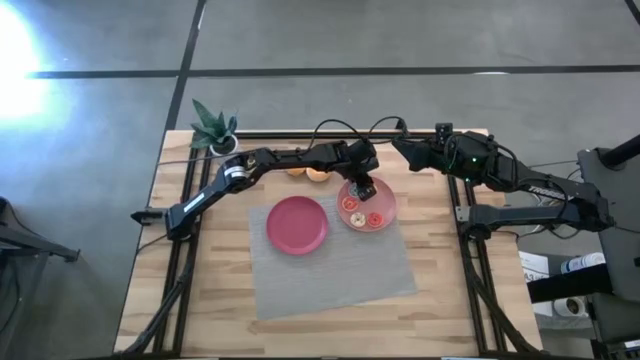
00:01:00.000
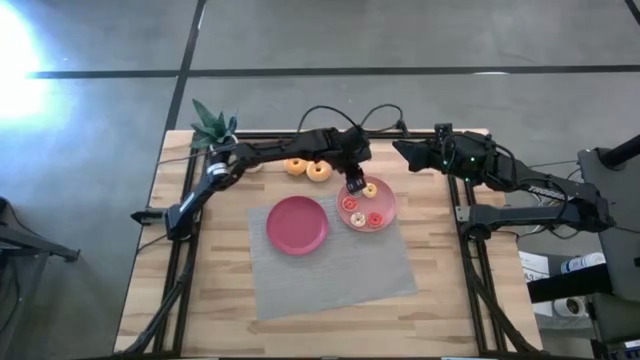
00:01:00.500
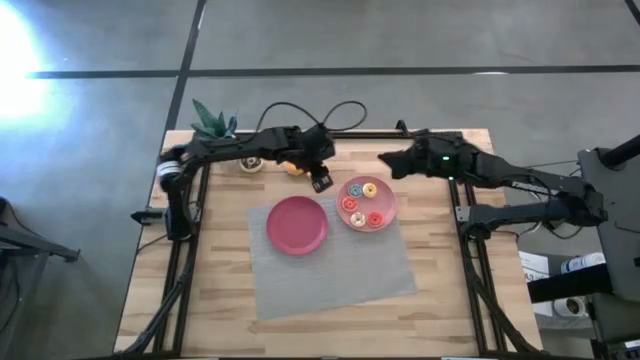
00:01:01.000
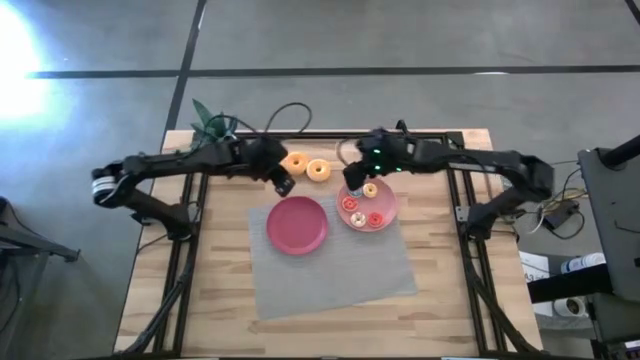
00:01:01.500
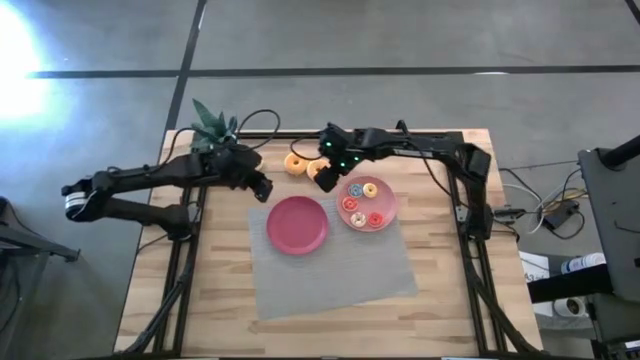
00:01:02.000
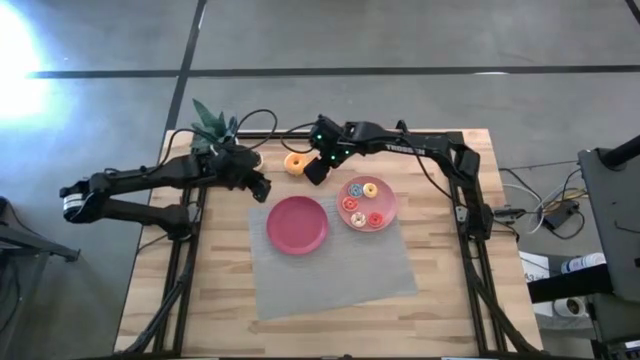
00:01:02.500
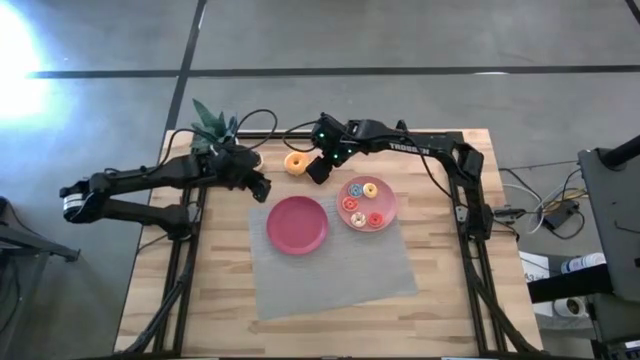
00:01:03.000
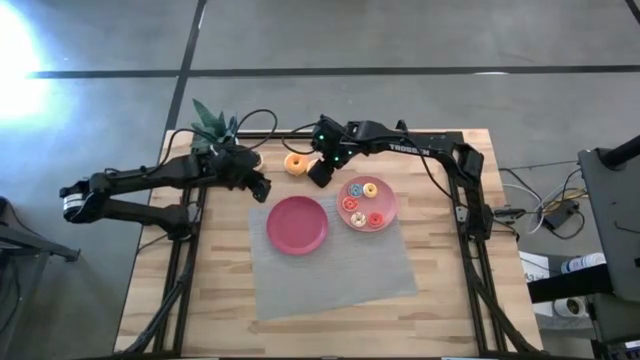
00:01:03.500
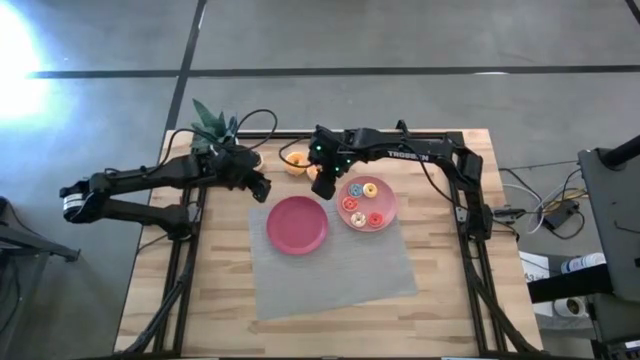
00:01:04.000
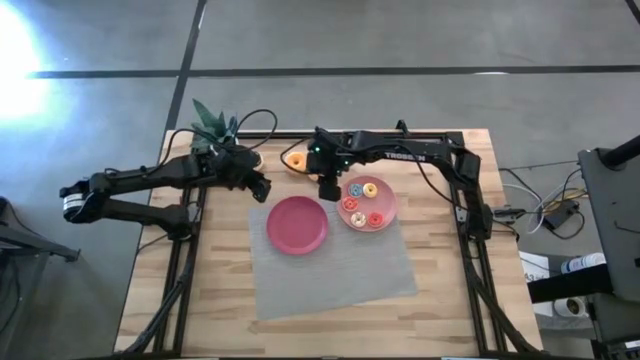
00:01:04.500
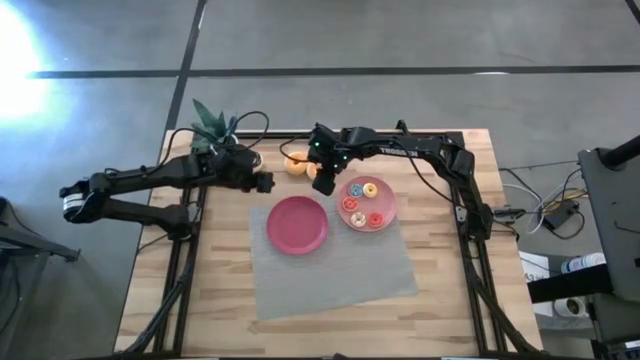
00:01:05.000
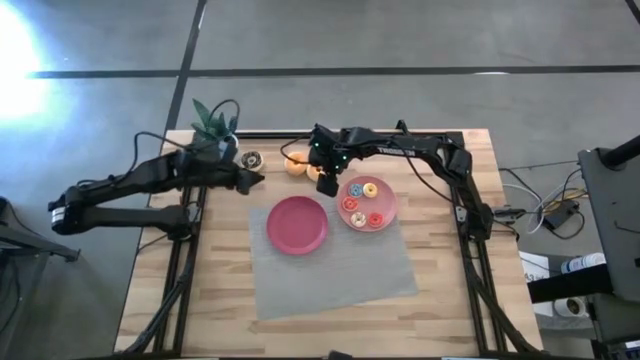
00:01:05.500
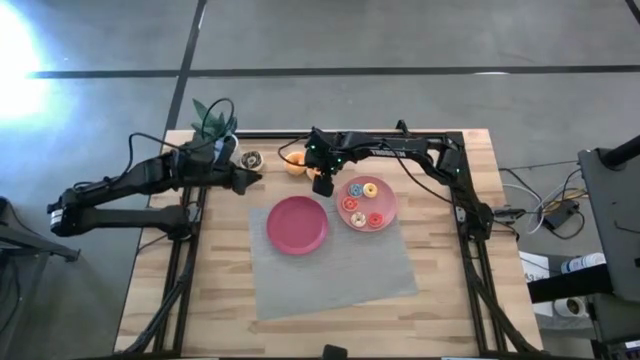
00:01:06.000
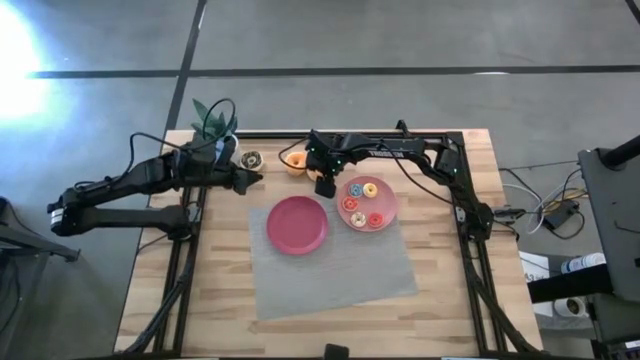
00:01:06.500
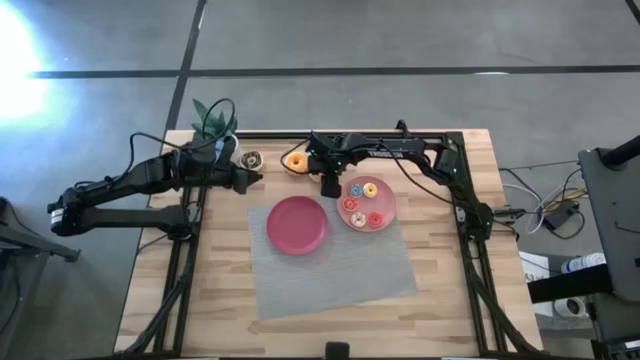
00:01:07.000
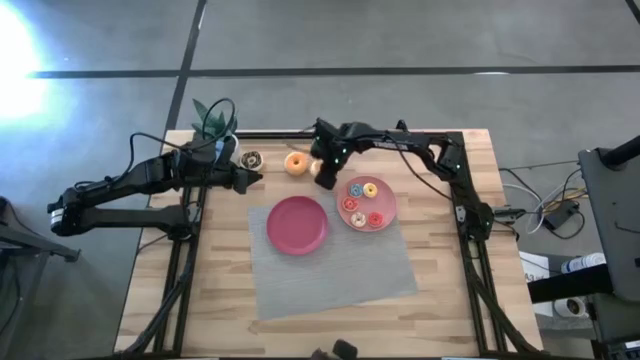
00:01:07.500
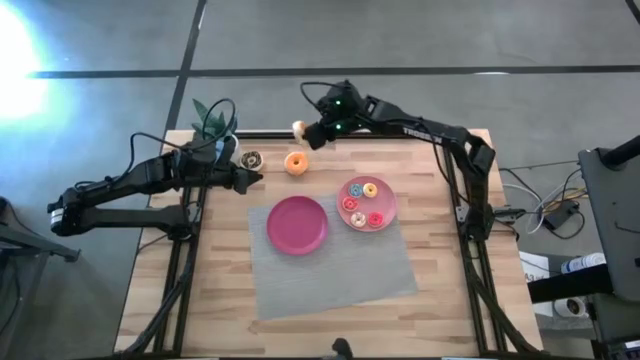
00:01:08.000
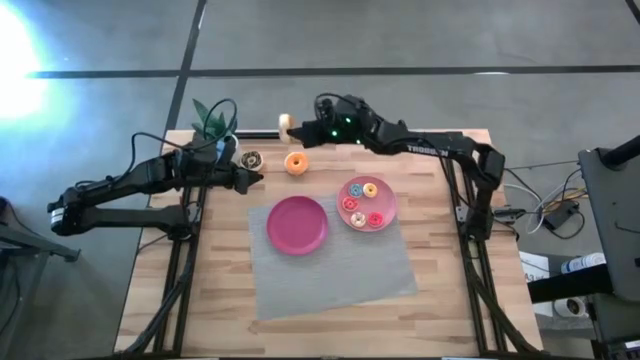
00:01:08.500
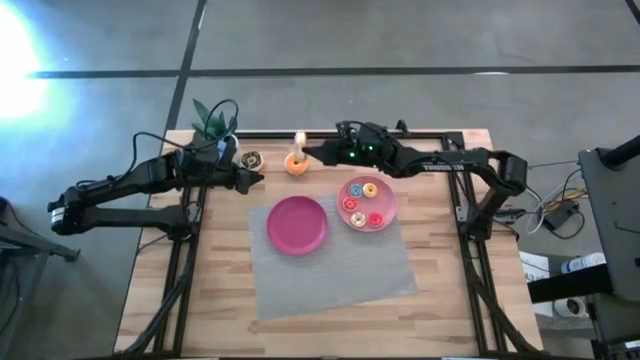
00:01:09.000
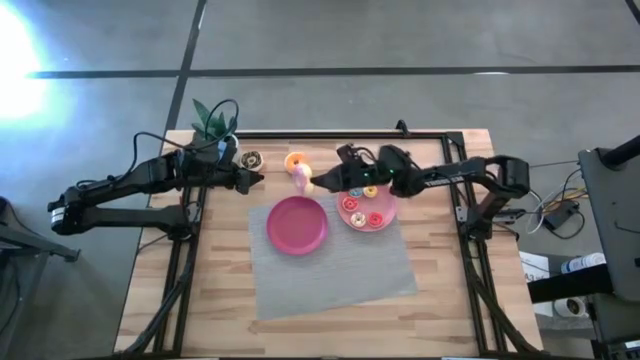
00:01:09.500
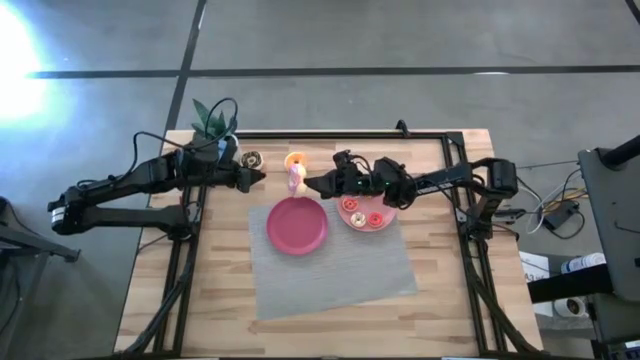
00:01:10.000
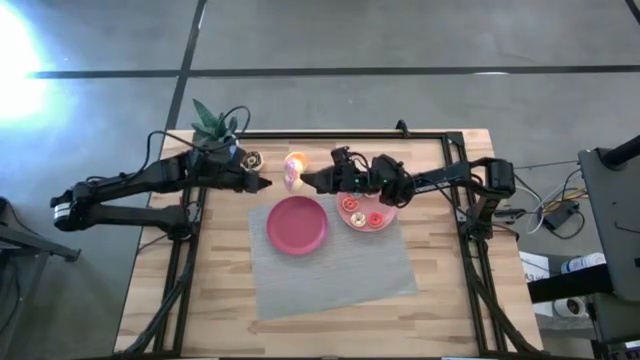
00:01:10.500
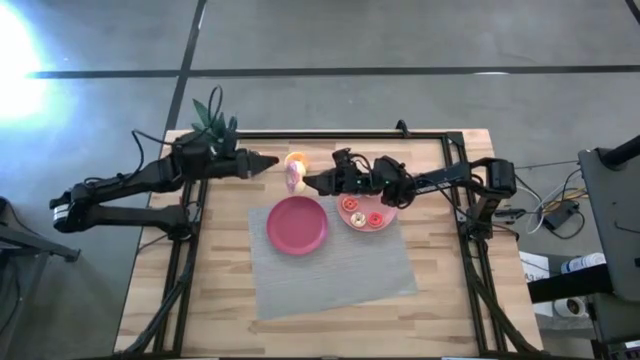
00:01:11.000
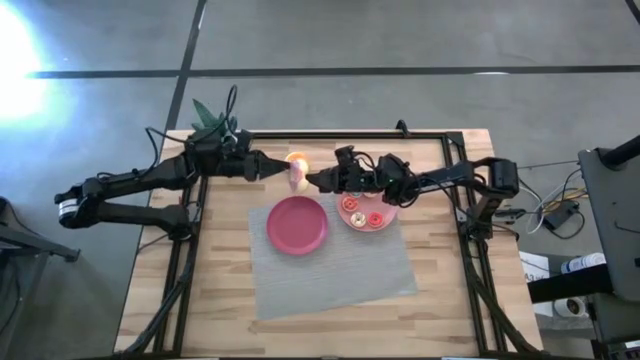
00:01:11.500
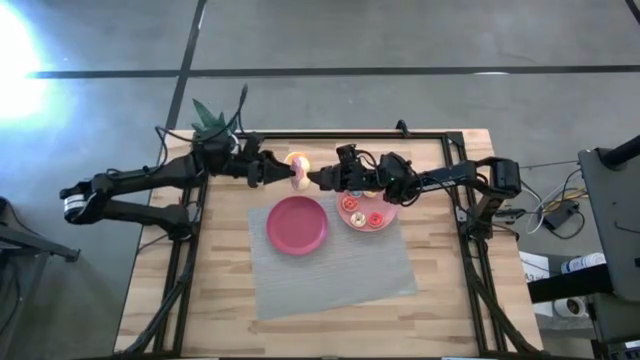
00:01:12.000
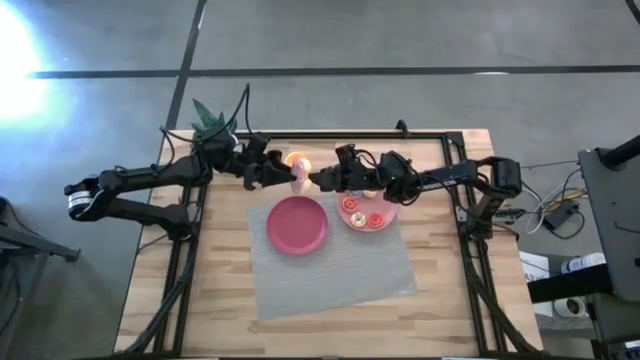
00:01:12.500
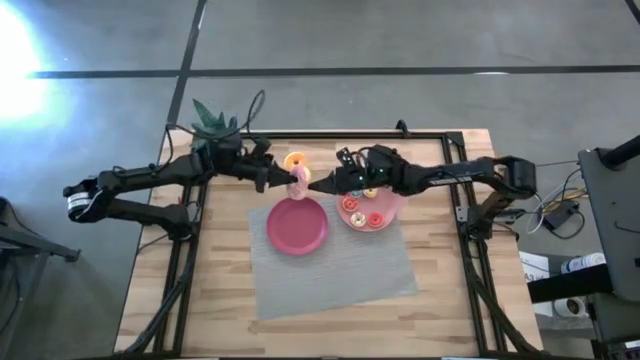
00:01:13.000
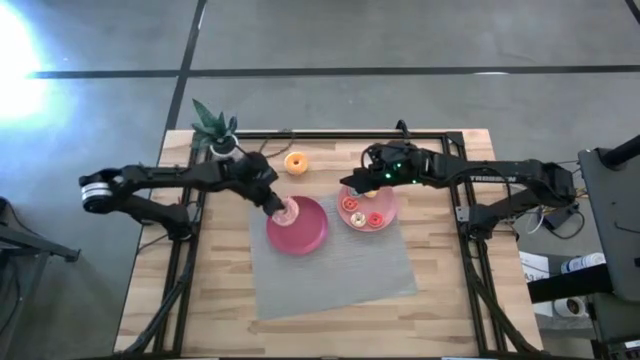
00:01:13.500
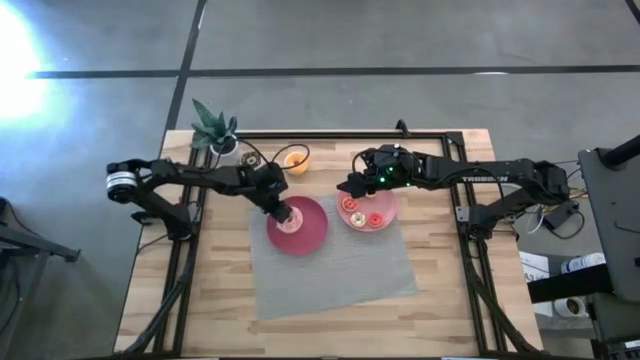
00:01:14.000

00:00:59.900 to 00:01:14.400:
Task: Pick & Place donuts
Put the big pink donut on the pink plate

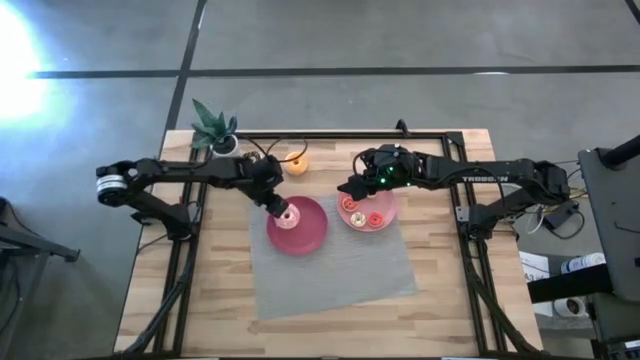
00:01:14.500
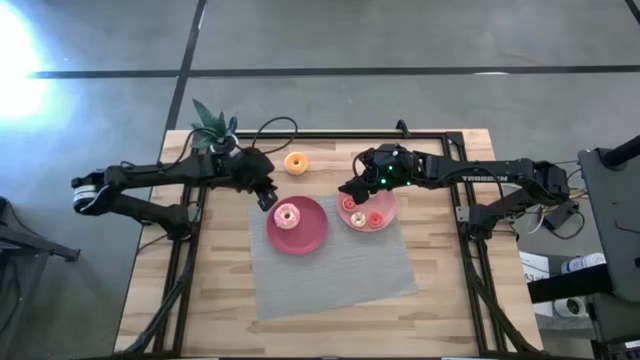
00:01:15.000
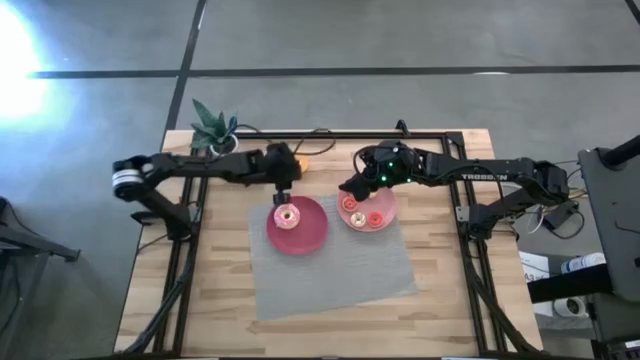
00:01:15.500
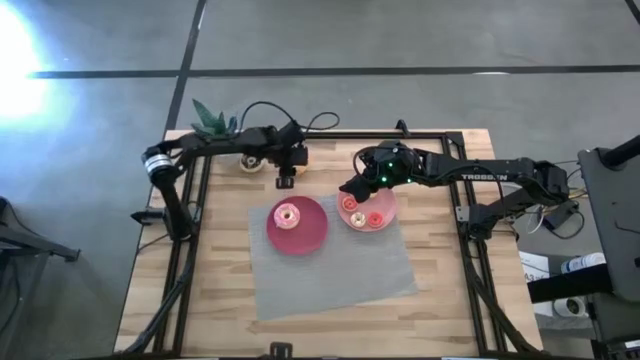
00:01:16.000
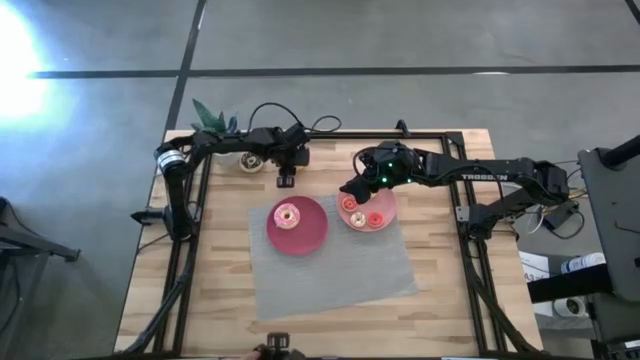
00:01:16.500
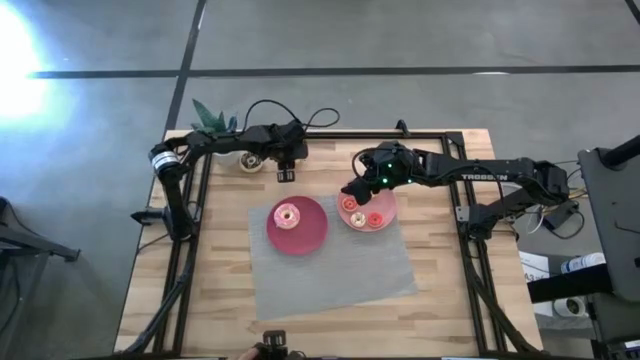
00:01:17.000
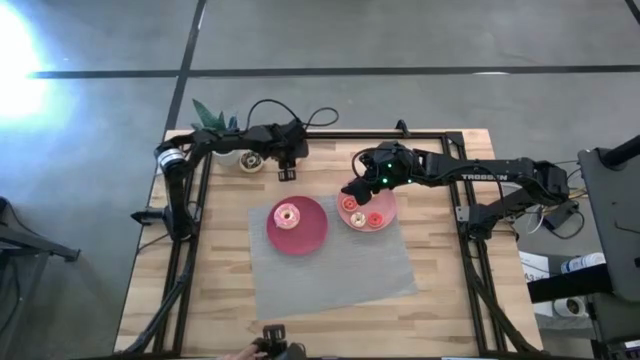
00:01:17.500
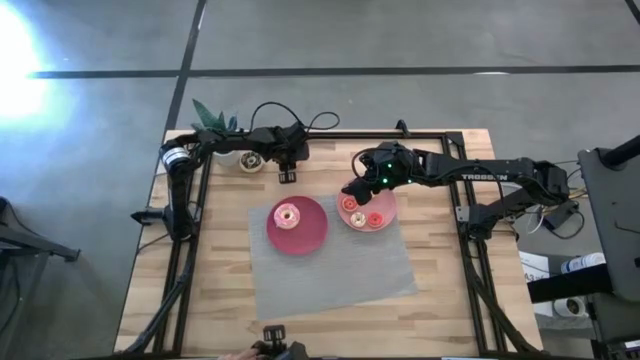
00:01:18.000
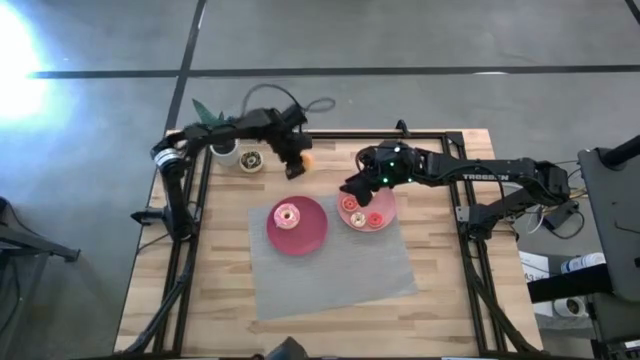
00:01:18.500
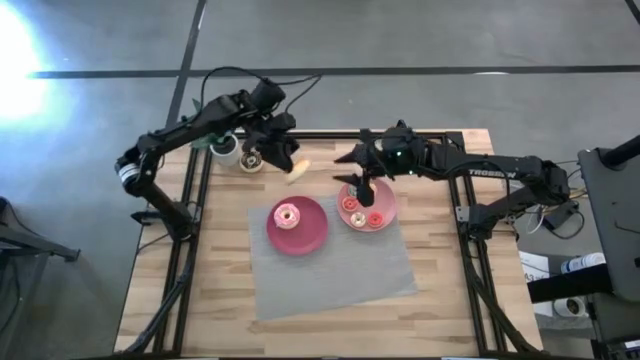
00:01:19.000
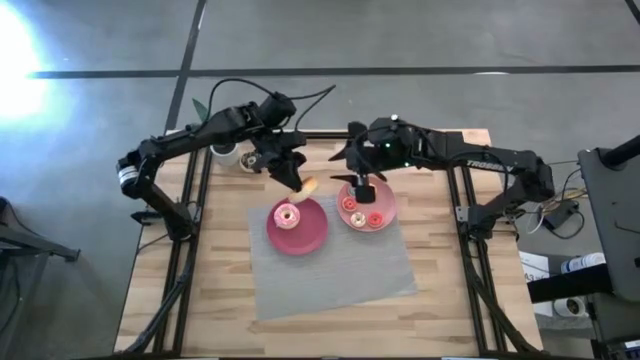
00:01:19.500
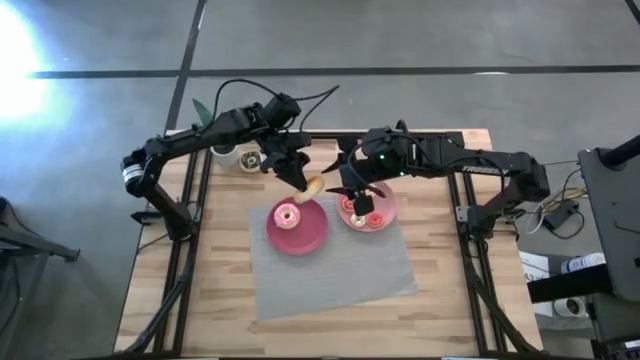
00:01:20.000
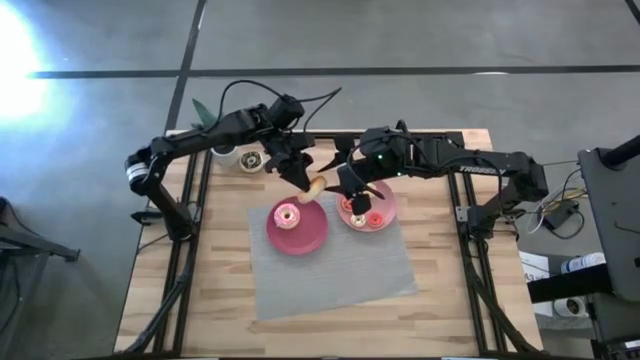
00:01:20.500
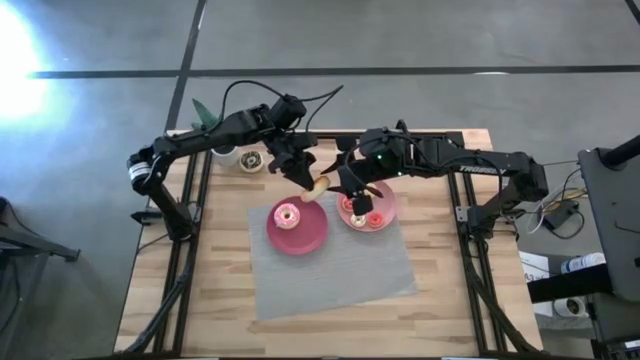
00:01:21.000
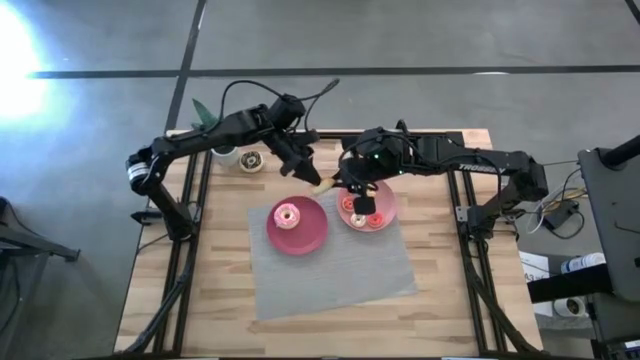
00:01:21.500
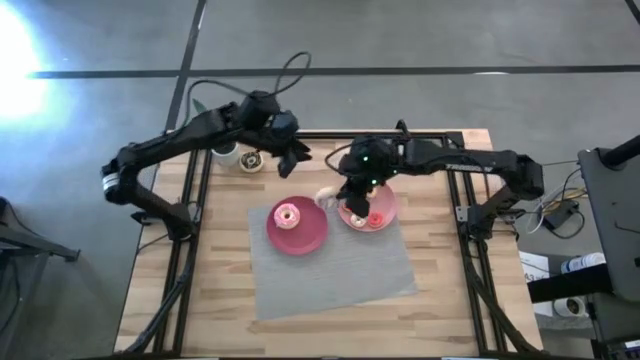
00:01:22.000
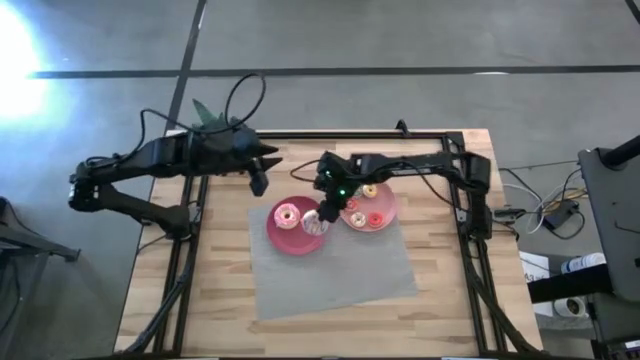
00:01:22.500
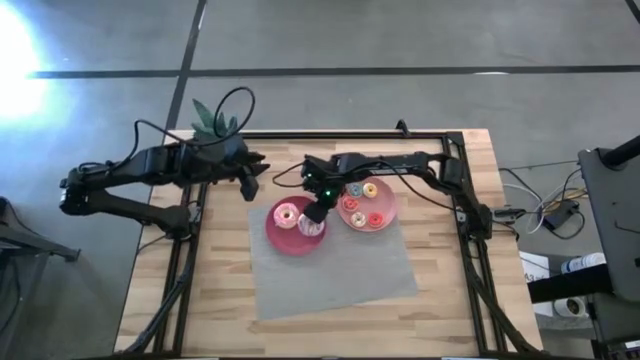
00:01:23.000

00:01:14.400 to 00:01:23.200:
Put the big purple donut on the pink plate
